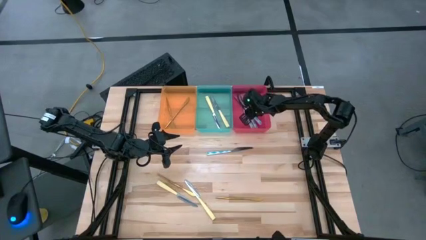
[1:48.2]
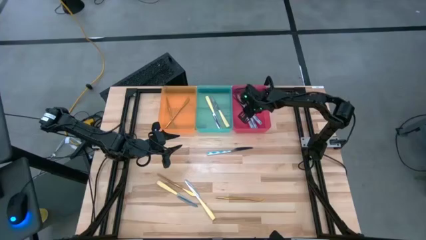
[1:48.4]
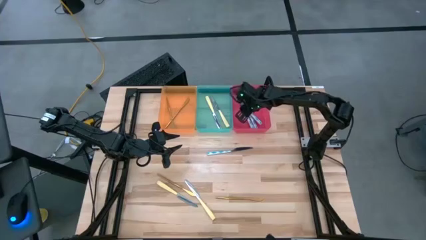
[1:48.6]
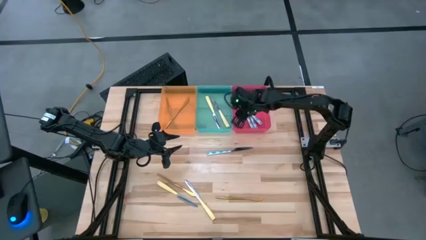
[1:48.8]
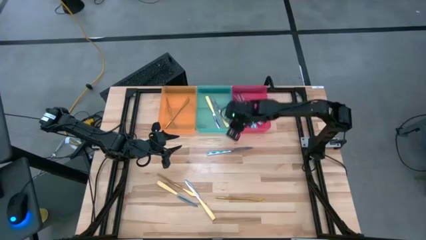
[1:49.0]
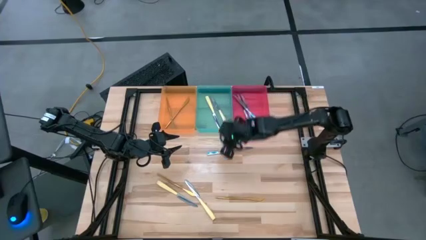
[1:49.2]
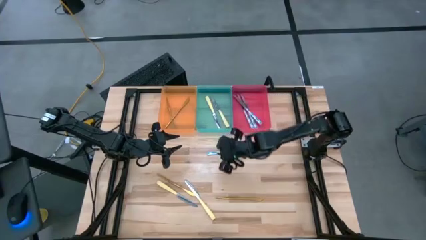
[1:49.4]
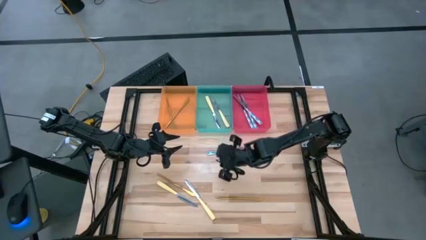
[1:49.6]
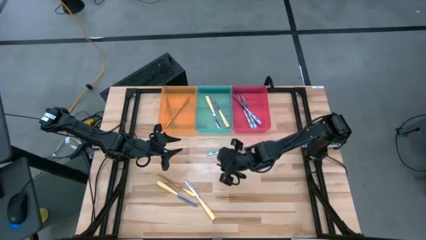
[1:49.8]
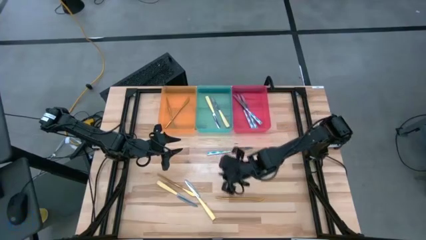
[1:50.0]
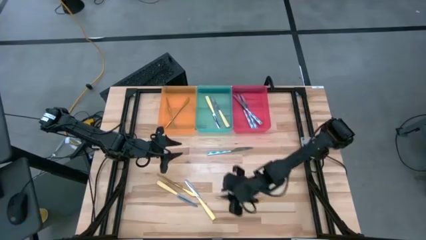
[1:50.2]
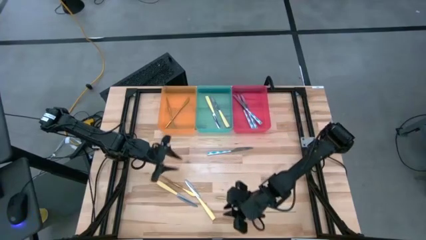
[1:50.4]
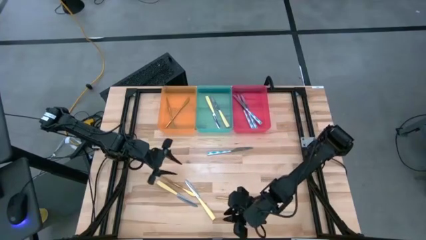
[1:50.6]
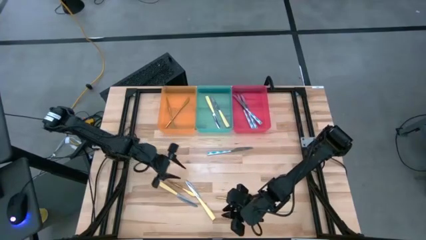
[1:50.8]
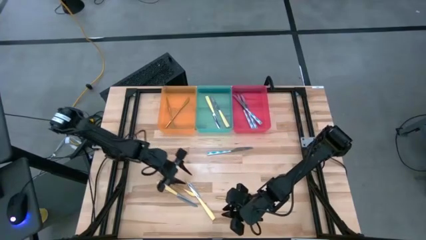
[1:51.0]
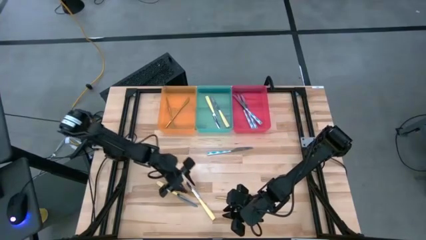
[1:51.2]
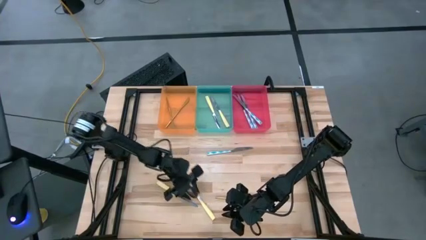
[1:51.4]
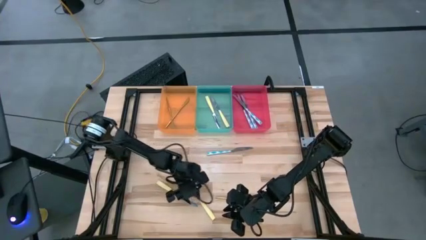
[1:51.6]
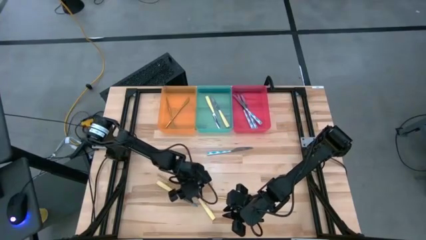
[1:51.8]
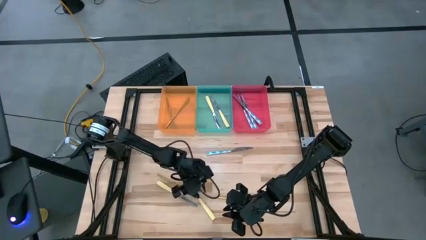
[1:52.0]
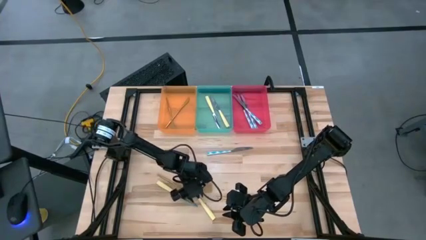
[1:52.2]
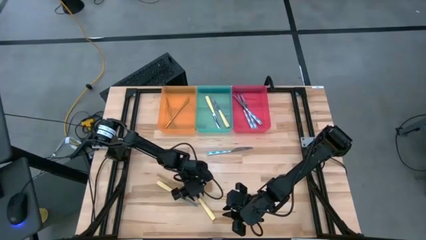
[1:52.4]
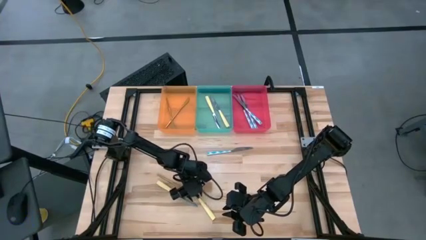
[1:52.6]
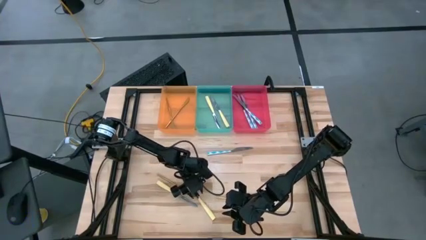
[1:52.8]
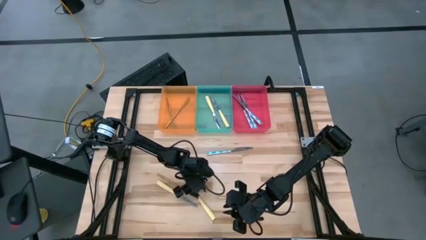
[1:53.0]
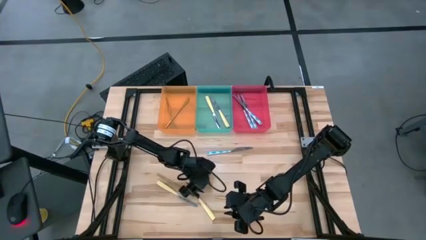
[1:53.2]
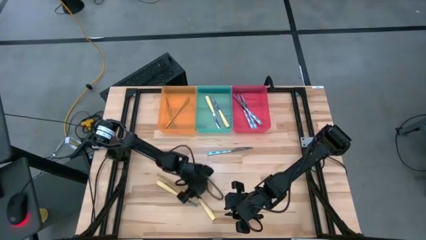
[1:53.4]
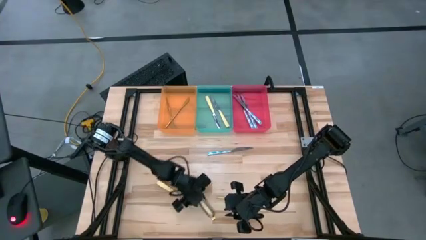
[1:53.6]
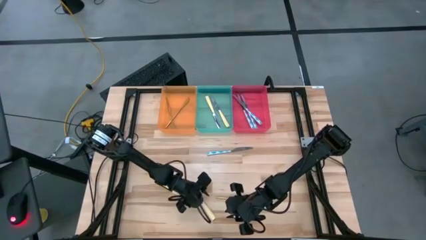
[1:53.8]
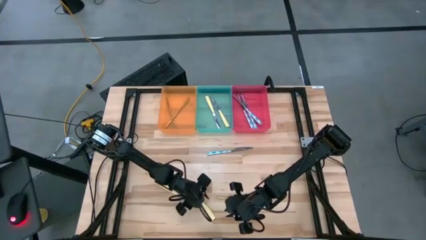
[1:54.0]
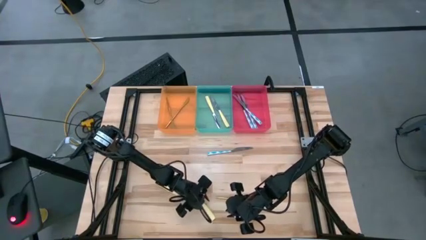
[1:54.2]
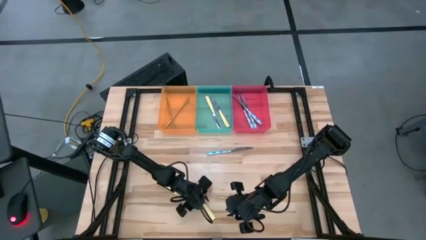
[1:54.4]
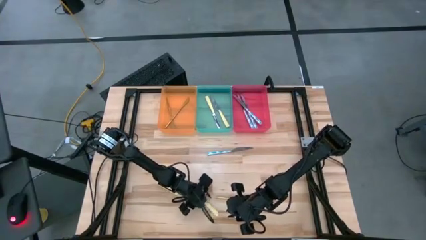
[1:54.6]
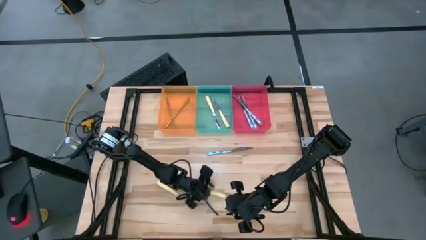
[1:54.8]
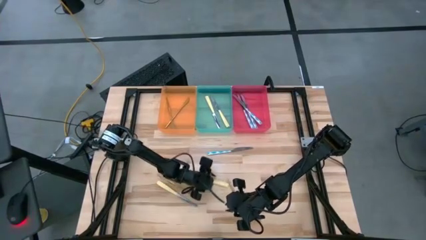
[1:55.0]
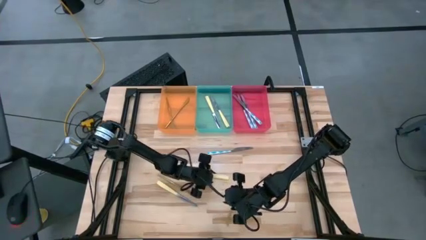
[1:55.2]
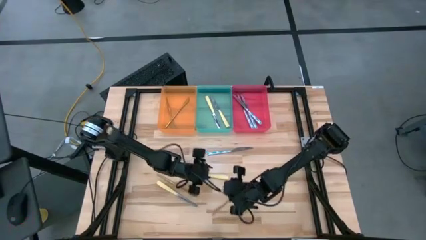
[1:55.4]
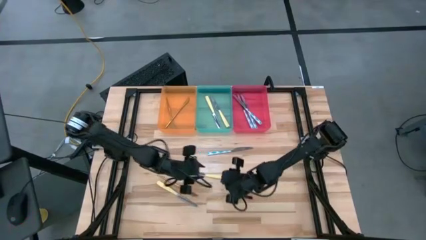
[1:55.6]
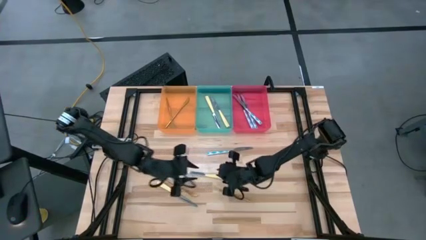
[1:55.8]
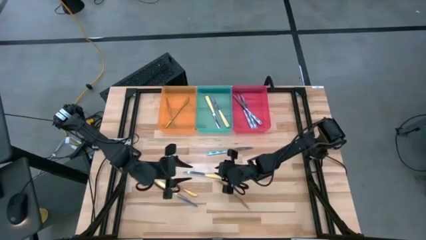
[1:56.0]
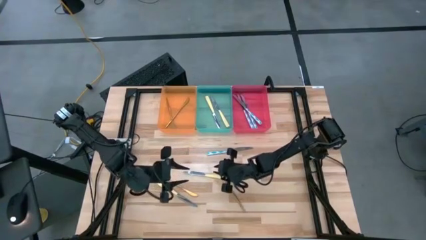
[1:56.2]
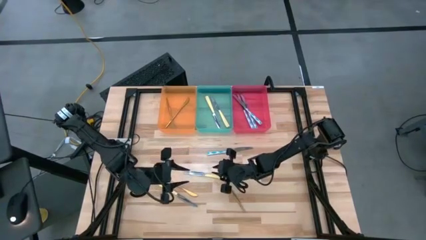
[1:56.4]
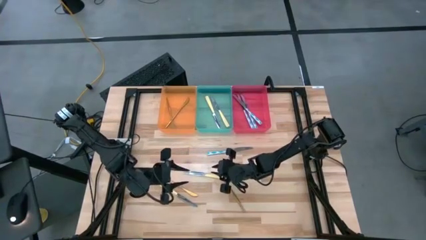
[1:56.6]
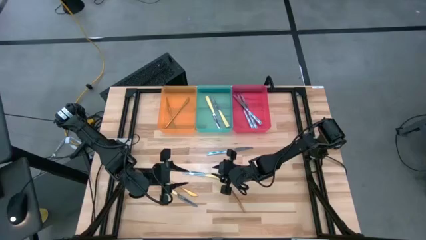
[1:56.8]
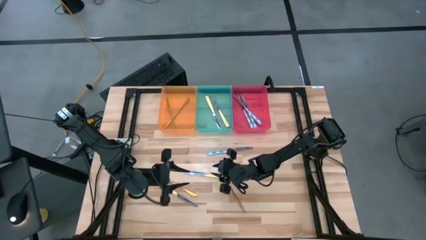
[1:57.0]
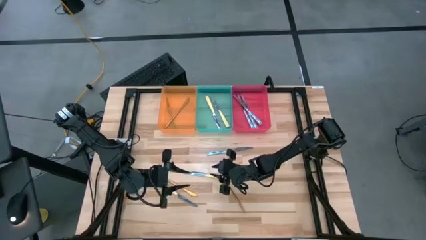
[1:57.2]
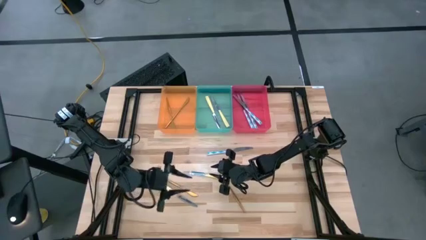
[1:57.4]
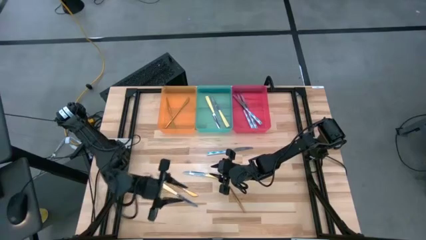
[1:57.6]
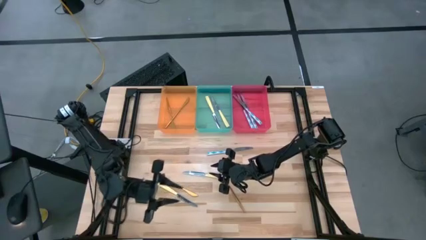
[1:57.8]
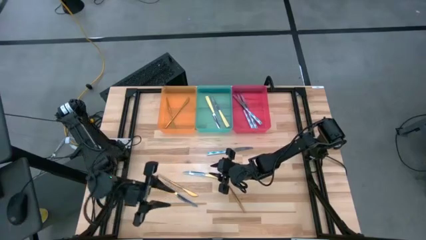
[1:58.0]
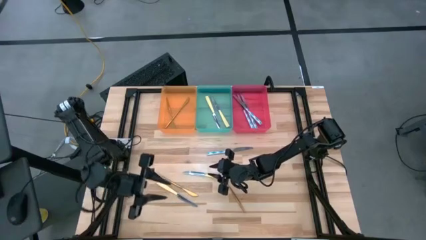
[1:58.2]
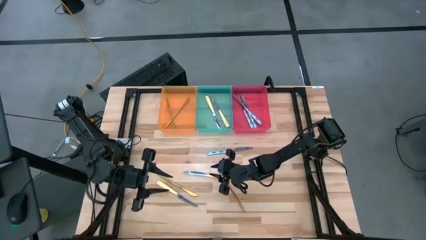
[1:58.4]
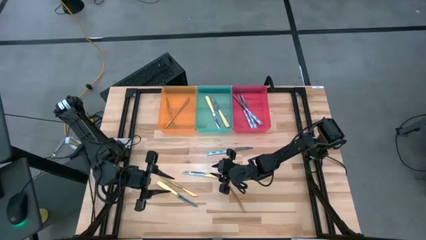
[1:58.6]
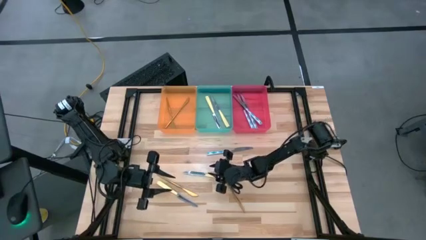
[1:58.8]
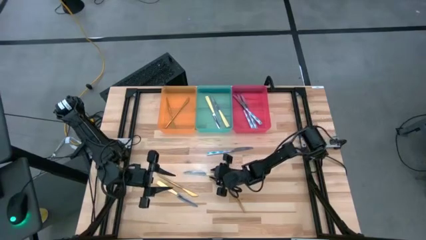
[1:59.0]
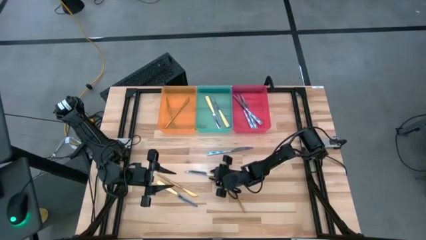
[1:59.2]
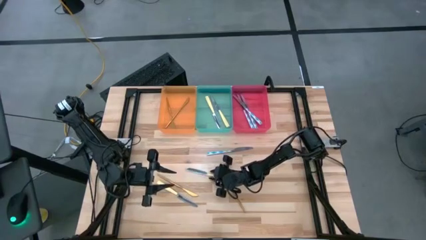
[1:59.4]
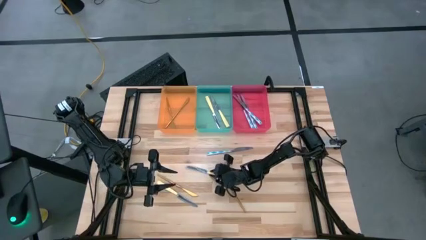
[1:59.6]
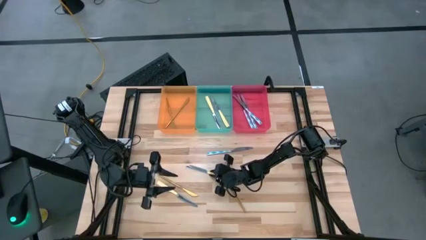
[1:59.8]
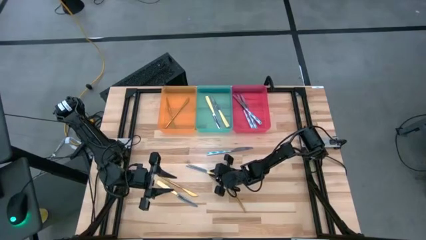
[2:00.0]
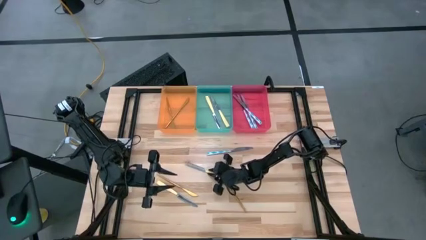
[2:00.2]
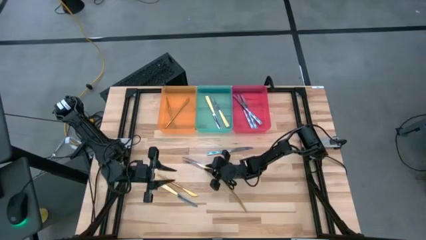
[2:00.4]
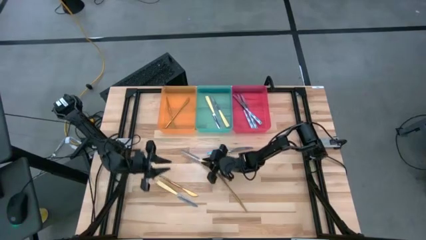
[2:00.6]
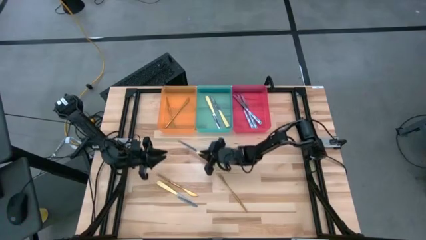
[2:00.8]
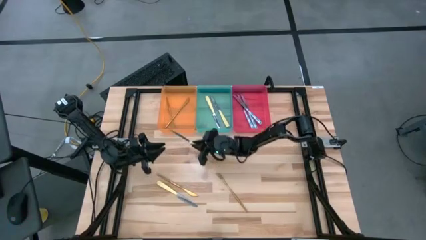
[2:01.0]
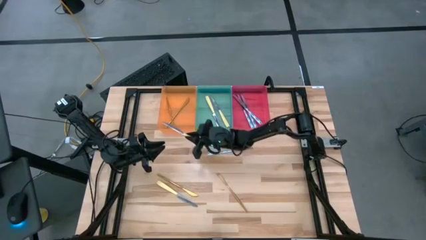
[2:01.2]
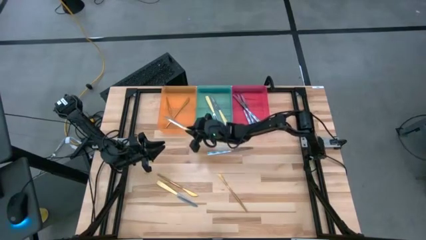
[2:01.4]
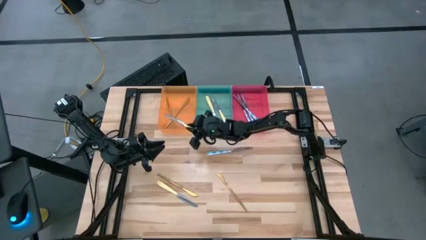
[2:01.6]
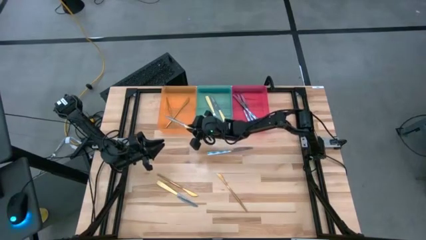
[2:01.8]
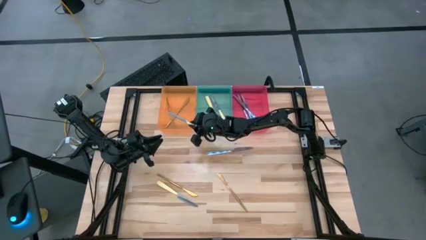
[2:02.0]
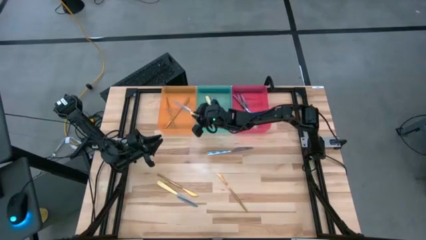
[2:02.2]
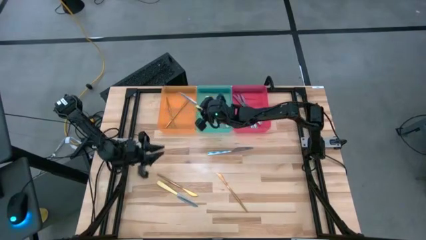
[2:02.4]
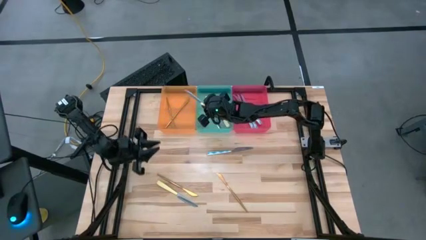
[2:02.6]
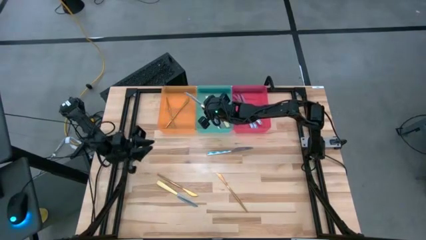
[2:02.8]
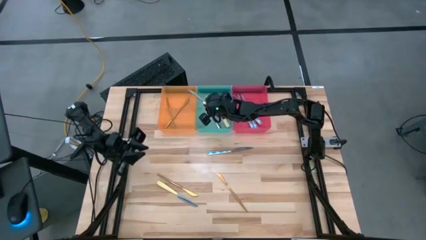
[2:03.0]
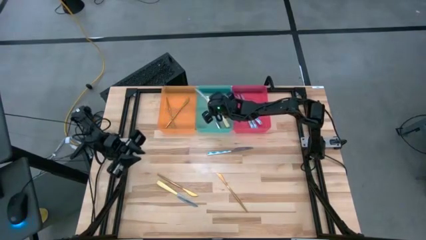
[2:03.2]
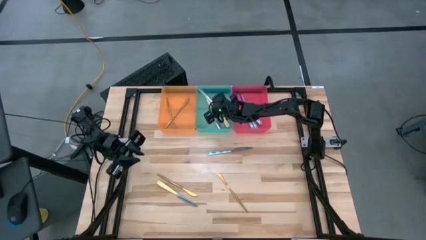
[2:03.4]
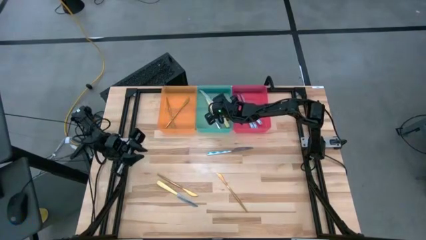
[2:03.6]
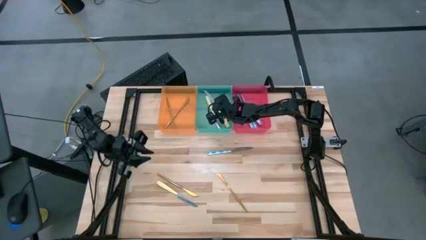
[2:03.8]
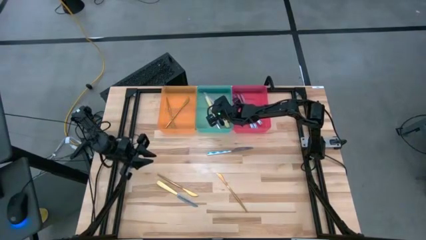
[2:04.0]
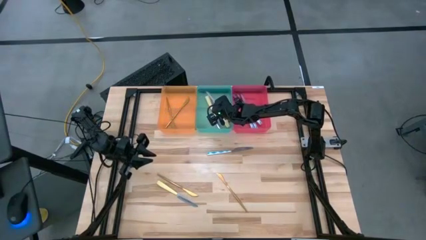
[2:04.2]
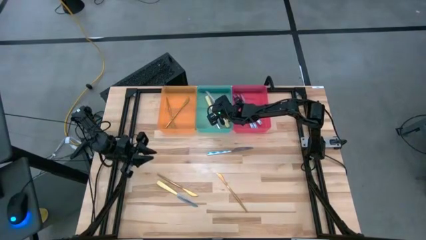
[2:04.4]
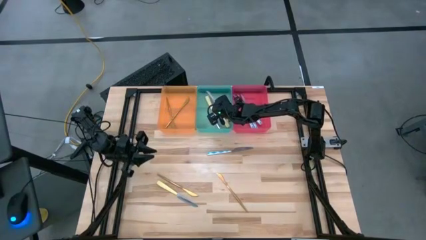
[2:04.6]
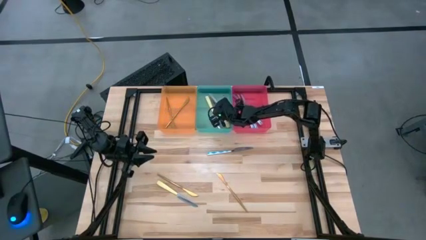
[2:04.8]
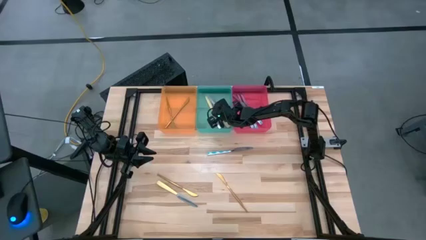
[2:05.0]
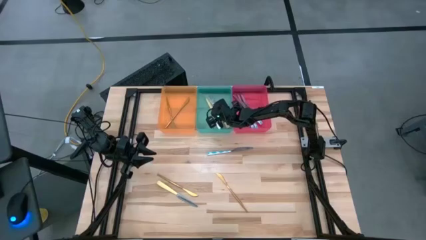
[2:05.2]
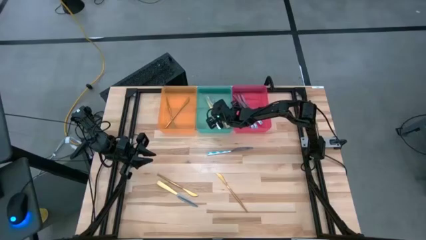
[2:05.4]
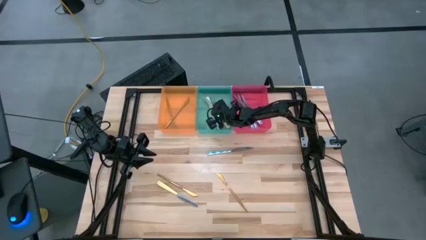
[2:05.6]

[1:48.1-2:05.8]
Task: Sort silverware by color (type)
Put the yellow table knife into the blue bin
